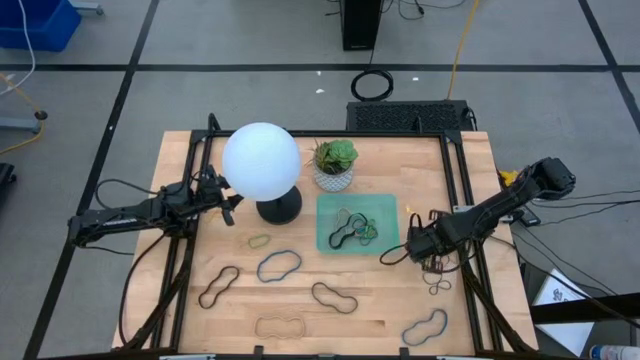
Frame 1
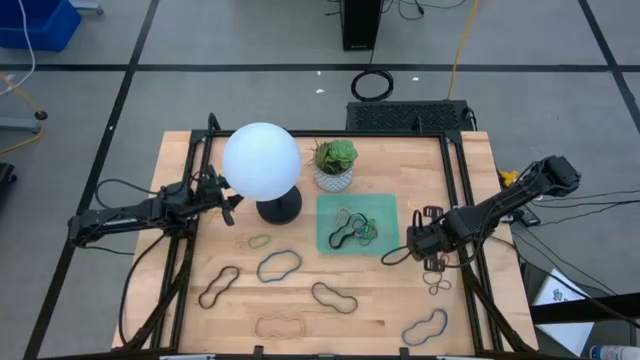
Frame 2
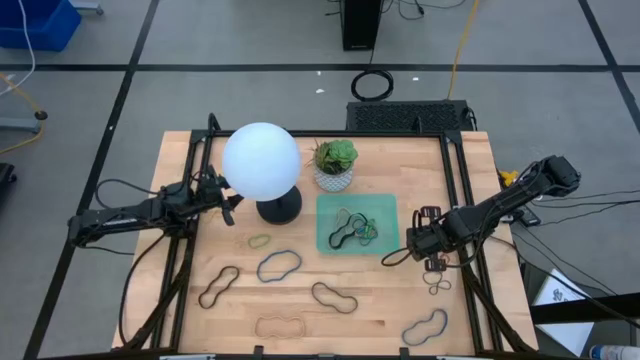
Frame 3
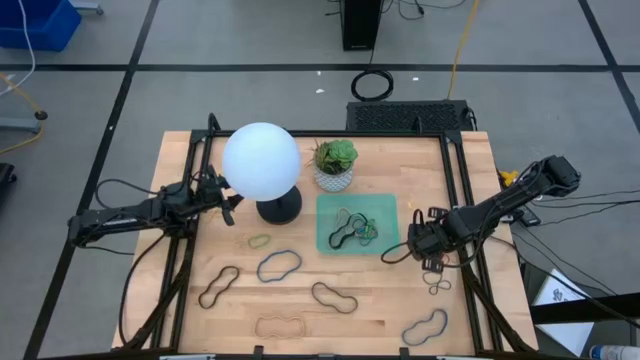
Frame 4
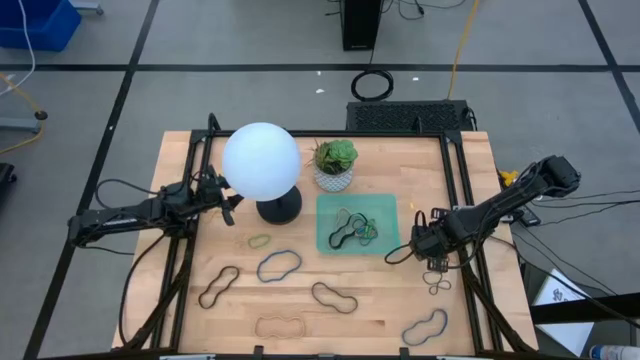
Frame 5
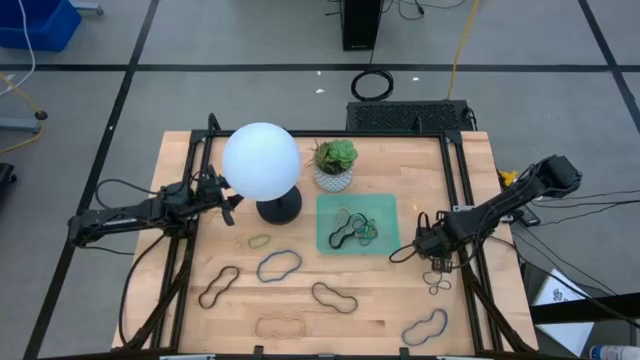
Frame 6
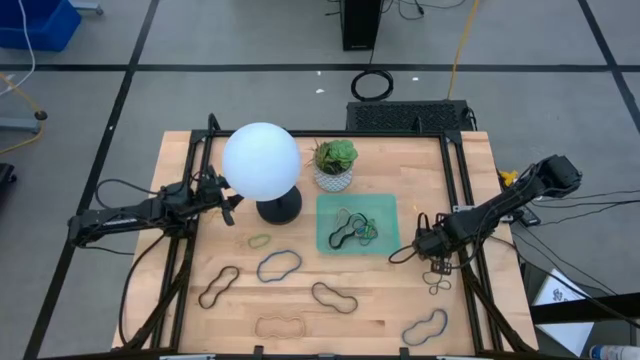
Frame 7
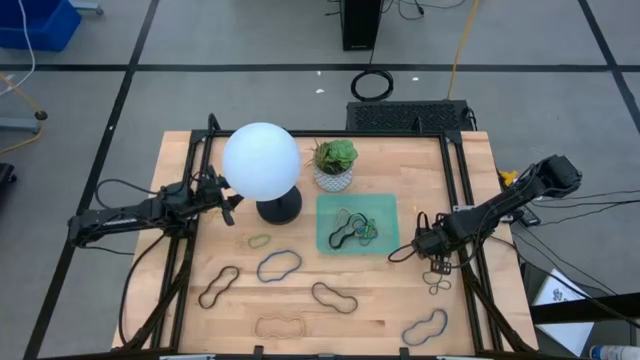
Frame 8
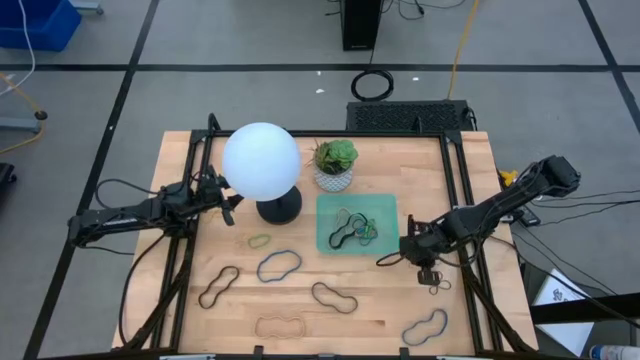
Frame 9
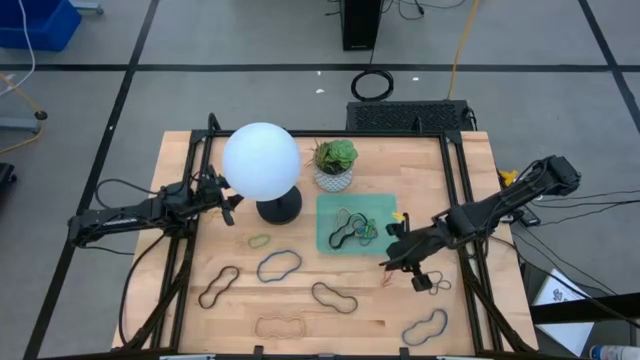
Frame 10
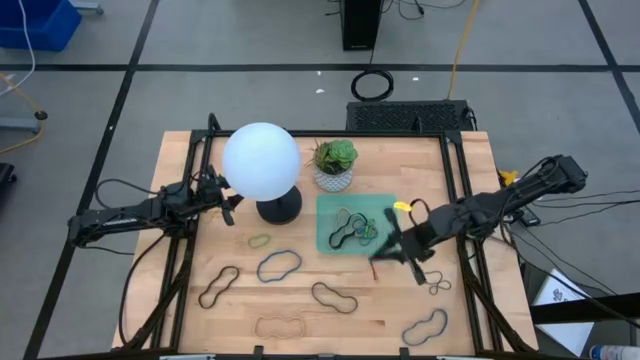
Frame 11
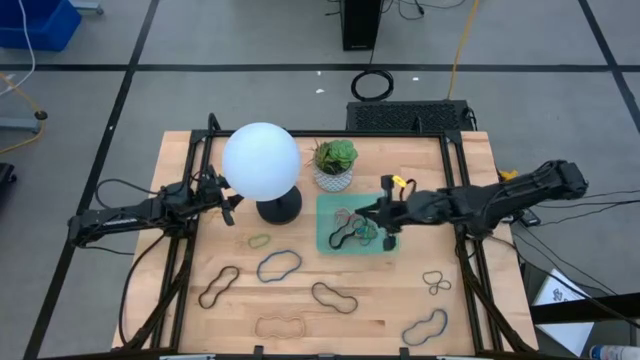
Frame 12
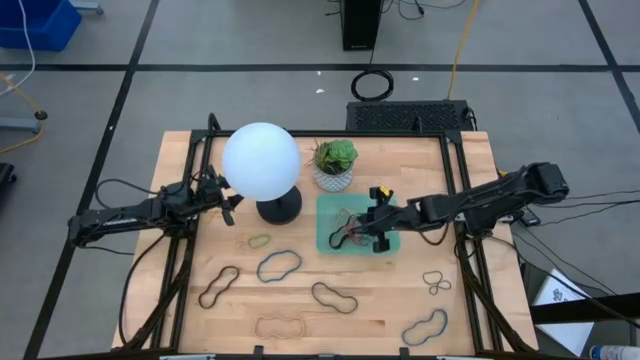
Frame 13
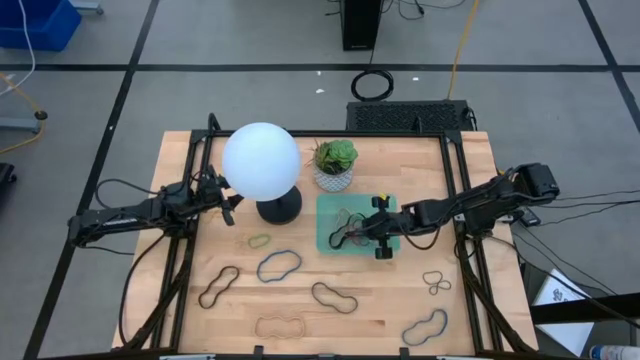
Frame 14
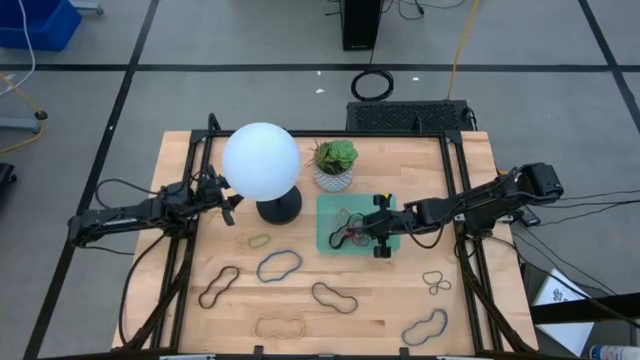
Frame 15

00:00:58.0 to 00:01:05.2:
Task: Pick and place rubber bands into bin
Put the red rubber band into the blue bin

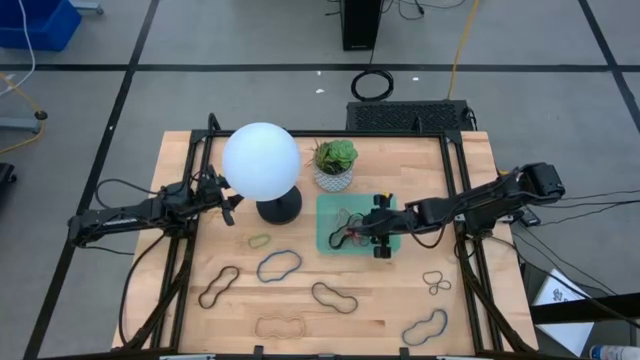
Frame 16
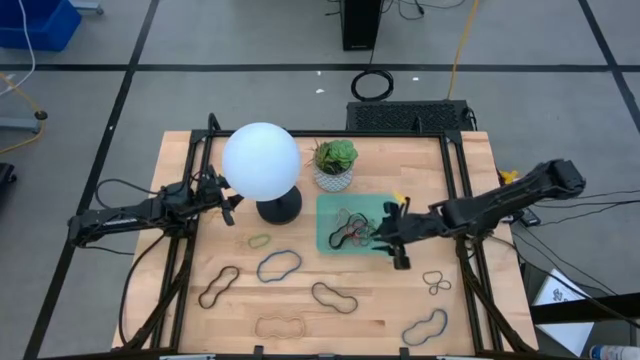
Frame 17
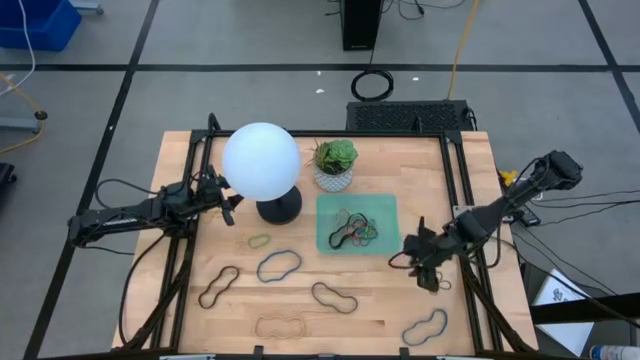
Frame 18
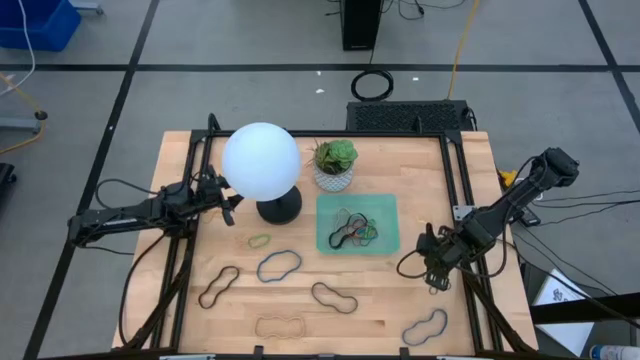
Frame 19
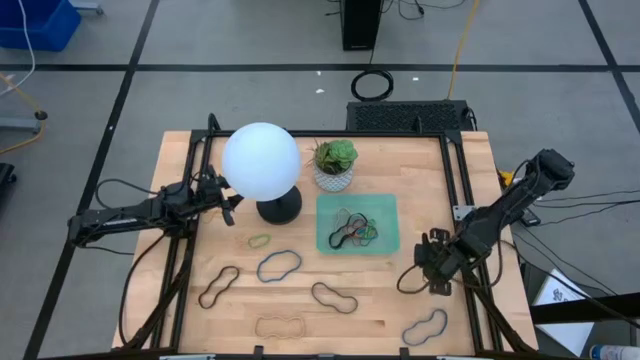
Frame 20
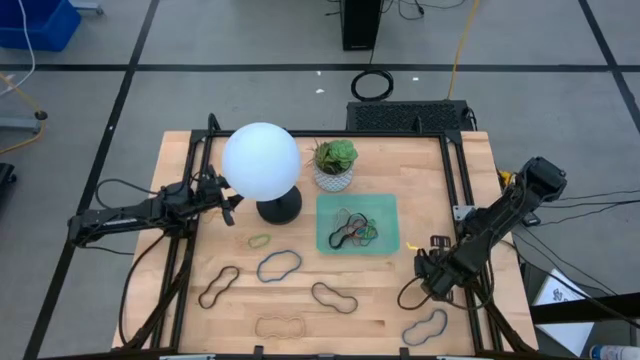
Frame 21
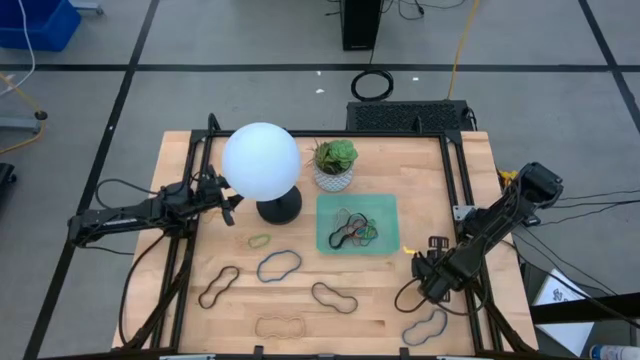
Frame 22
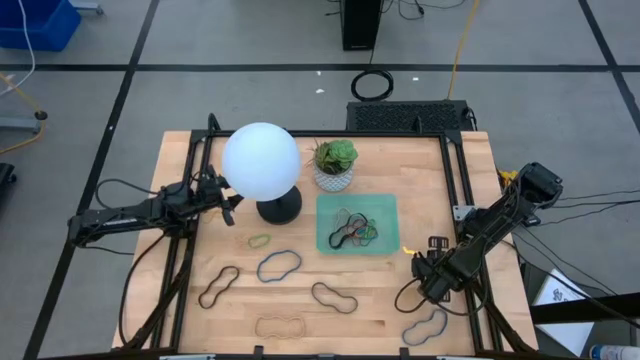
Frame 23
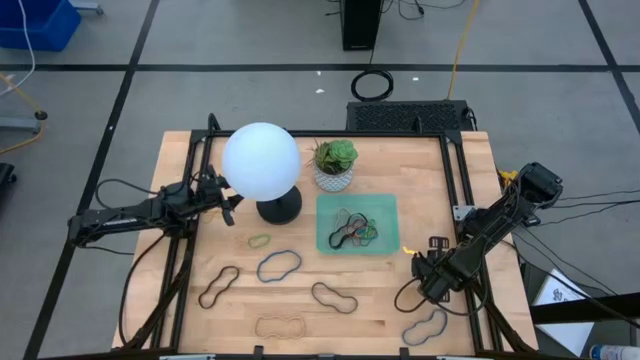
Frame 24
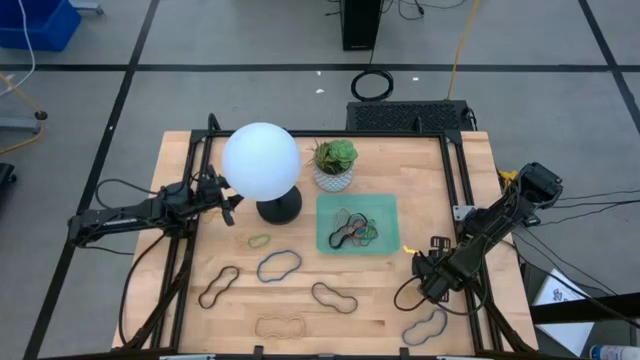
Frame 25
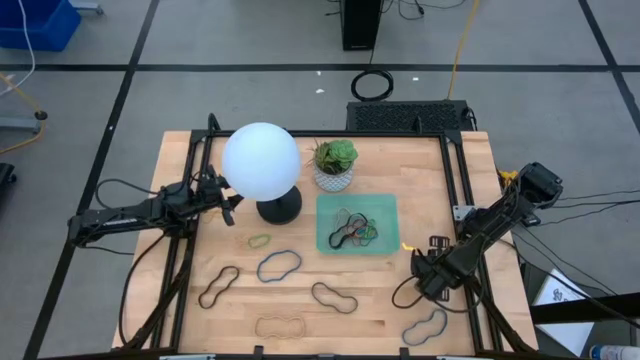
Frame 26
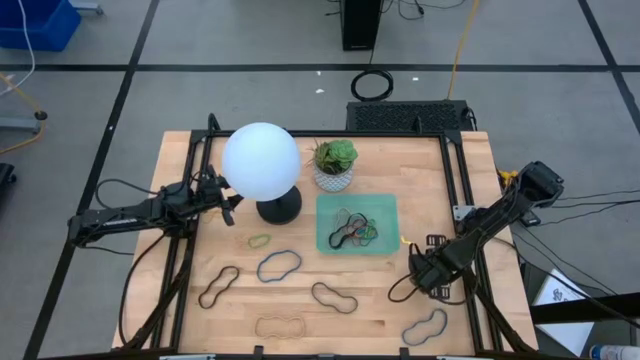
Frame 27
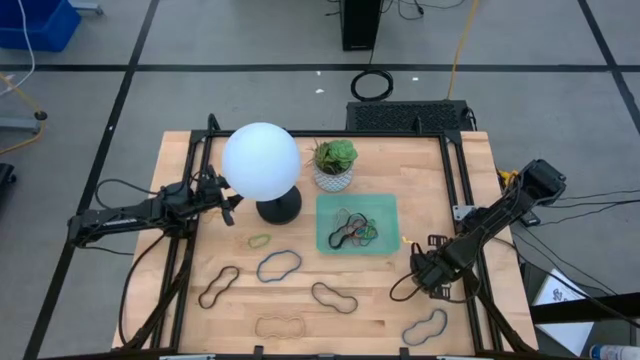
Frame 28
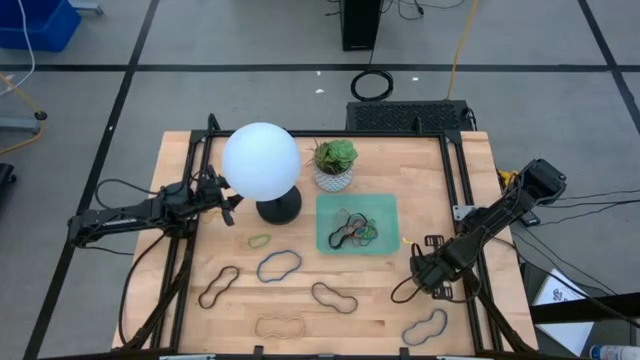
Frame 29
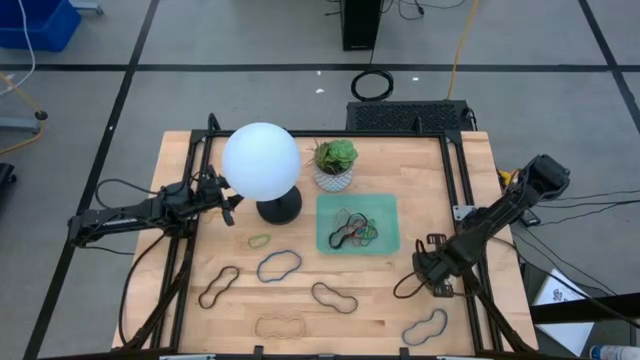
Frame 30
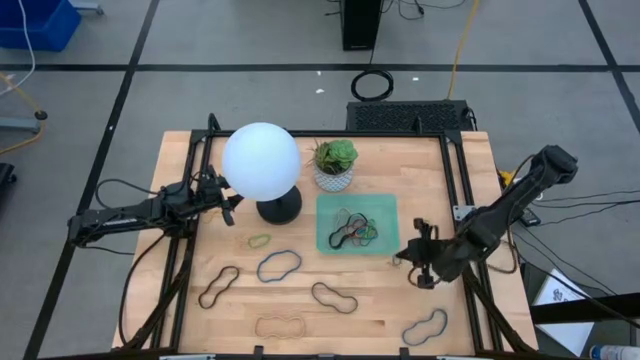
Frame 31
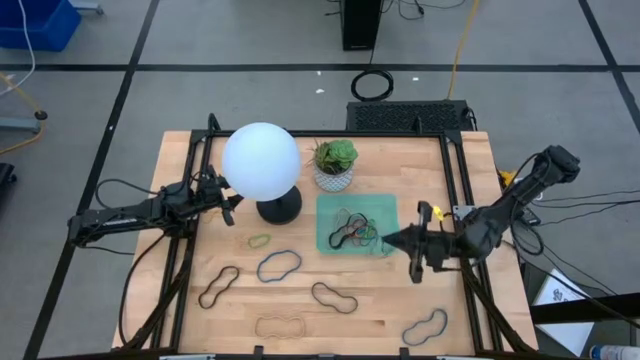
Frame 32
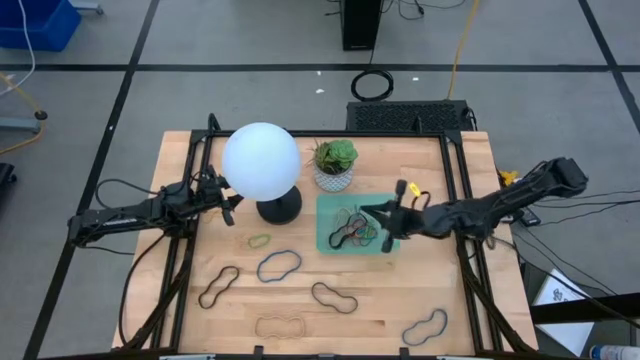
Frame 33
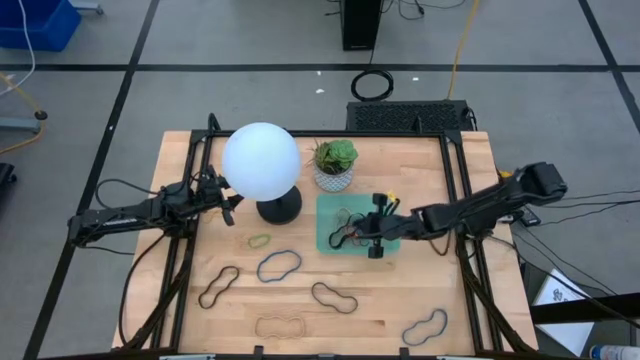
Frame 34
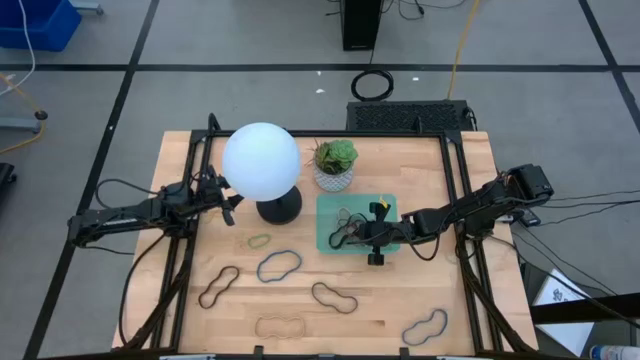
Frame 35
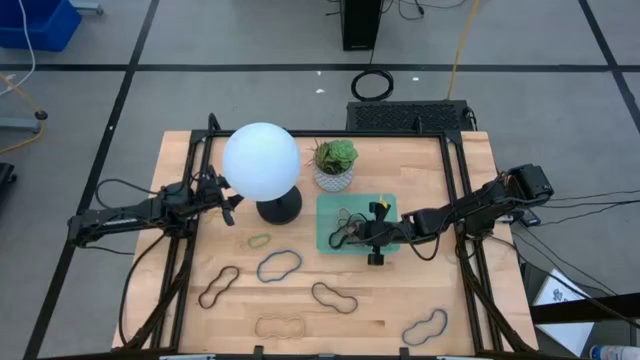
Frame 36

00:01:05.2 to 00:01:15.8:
Put the violet rubber band into the blue bin
